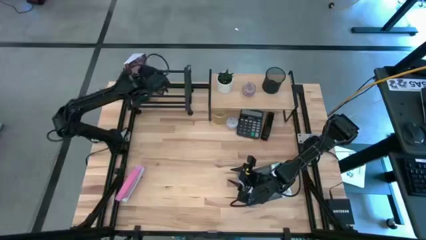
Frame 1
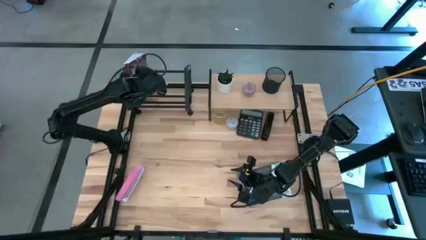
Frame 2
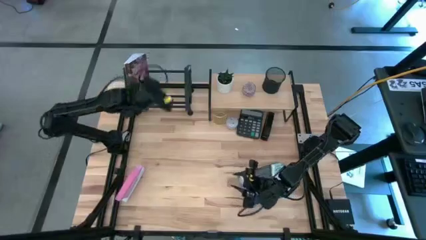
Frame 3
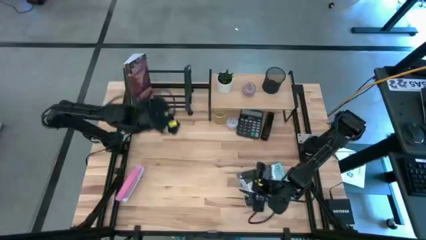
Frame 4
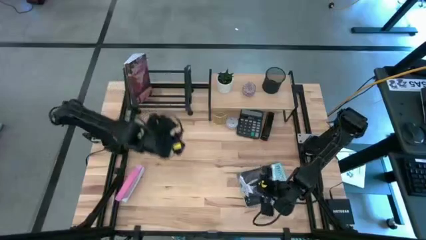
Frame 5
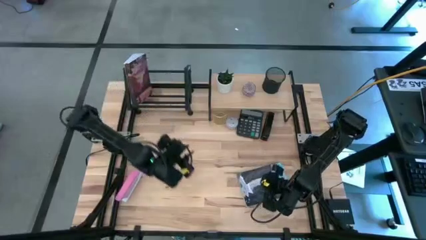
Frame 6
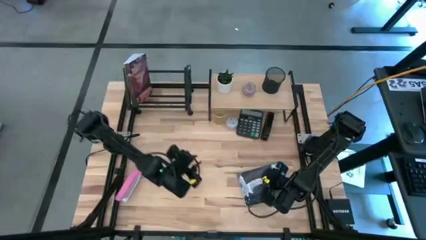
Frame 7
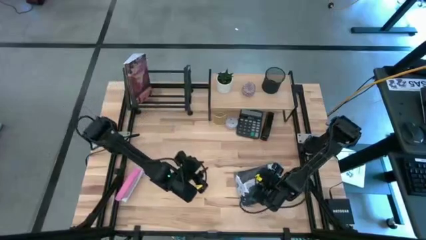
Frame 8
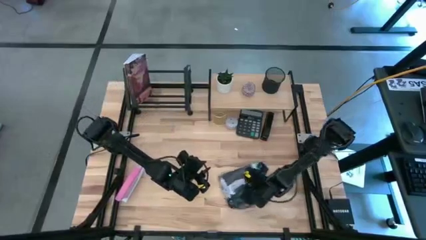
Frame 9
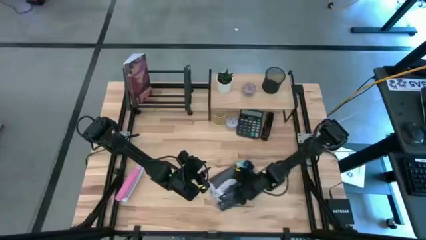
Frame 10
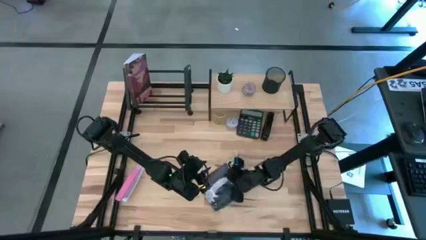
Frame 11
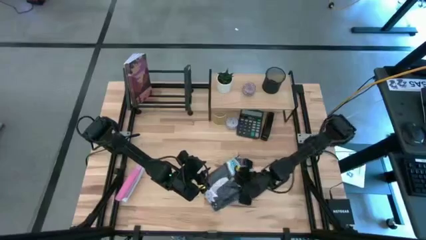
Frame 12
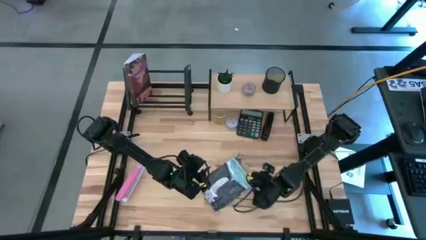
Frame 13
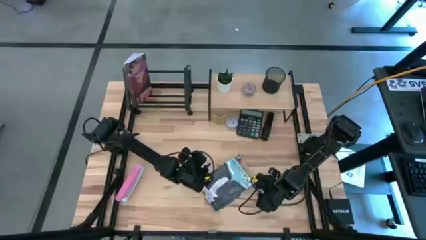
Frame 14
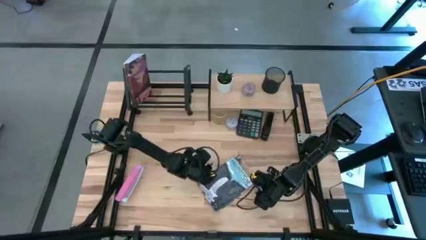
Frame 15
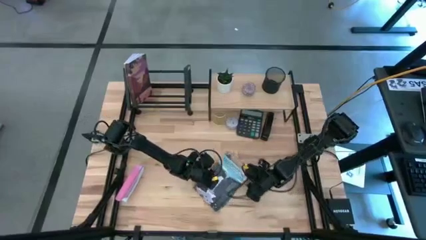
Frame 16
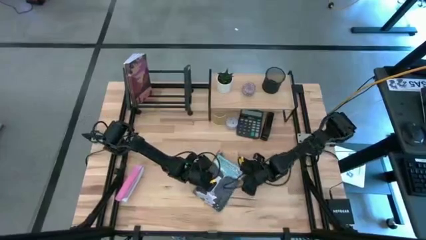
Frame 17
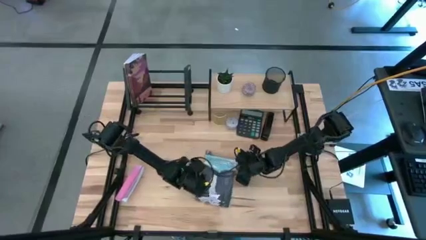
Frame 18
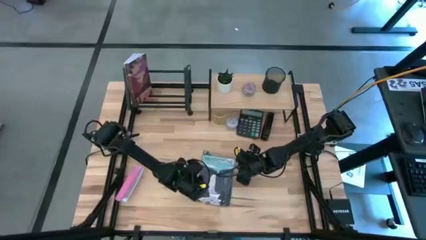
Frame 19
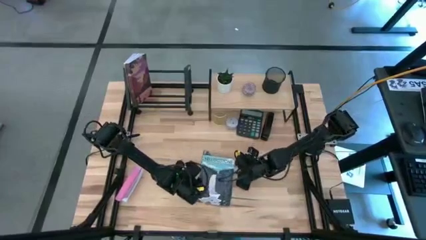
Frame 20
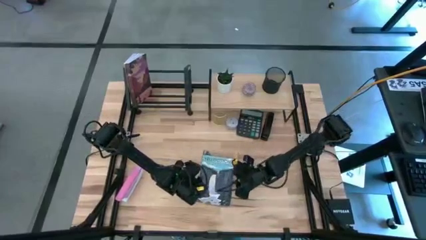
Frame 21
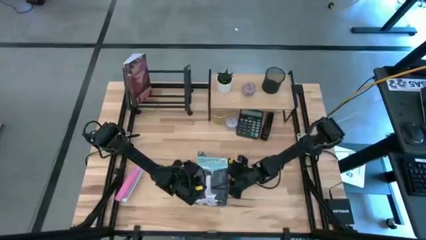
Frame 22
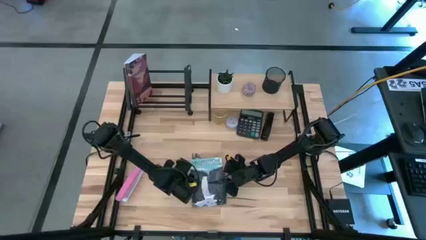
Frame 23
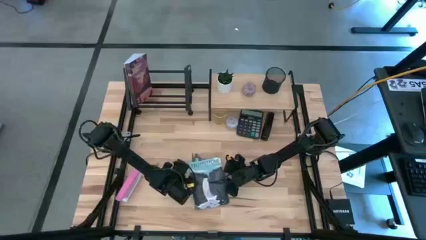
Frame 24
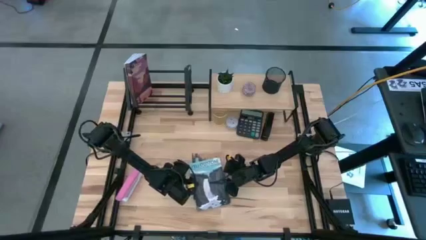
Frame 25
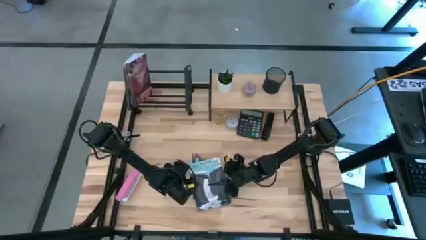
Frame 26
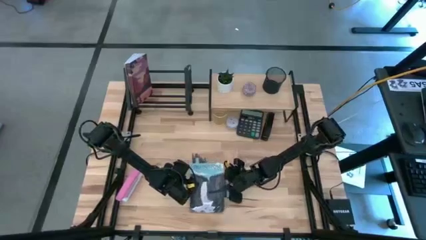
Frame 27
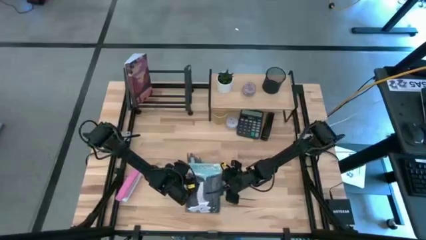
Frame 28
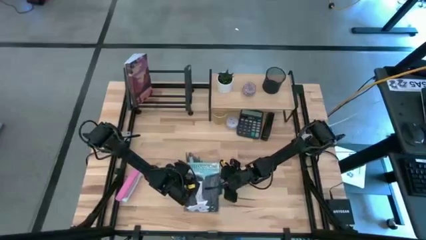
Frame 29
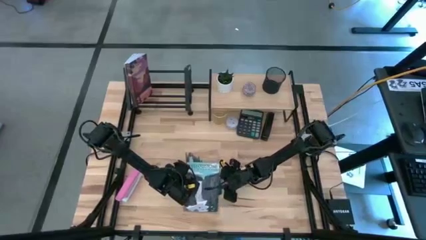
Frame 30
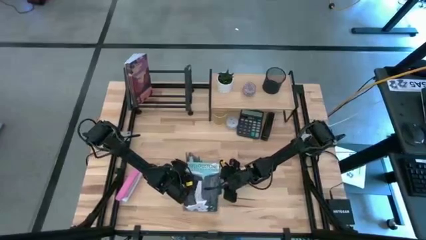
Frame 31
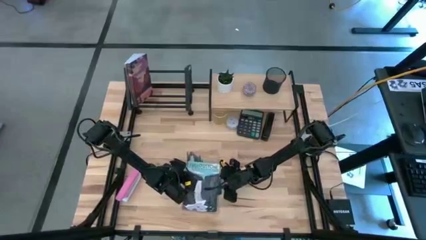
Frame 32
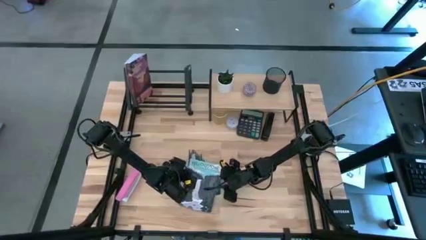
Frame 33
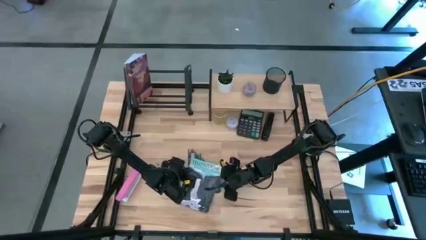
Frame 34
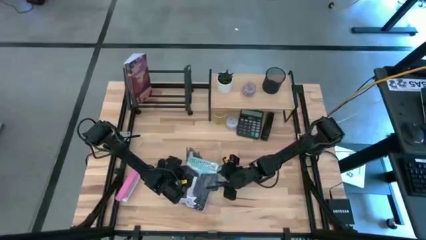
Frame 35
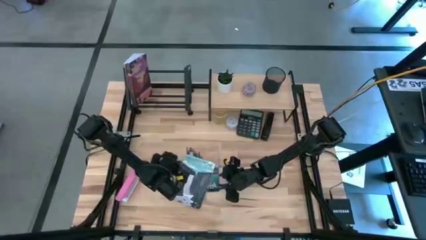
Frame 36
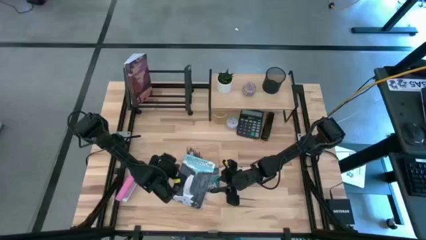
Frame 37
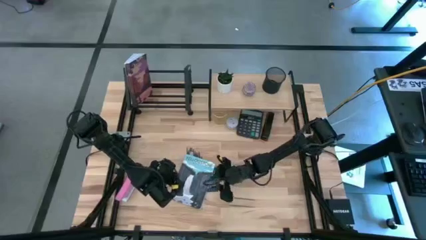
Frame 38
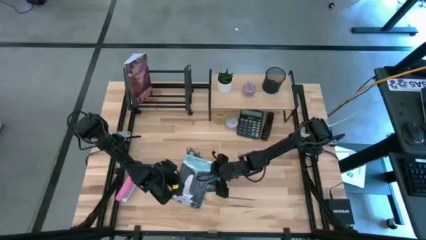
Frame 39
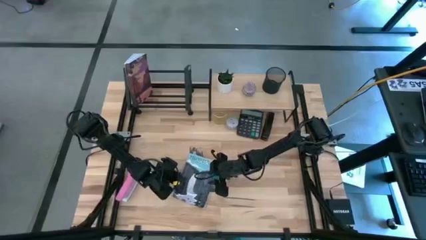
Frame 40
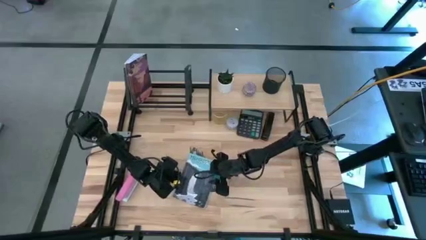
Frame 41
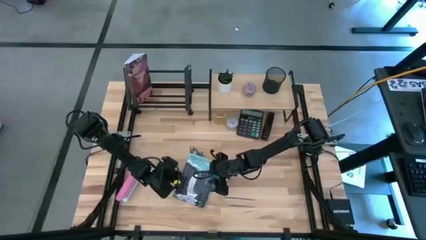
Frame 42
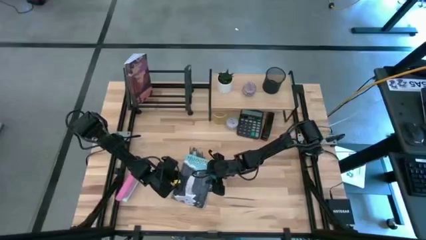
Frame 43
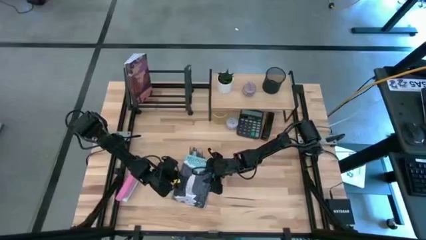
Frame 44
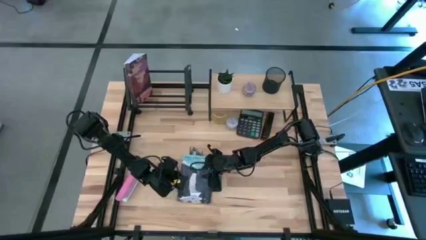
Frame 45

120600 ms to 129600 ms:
Task: Stock shelves
Put the blue book into the book holder

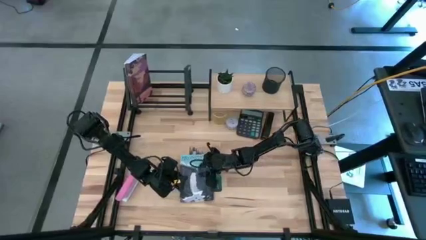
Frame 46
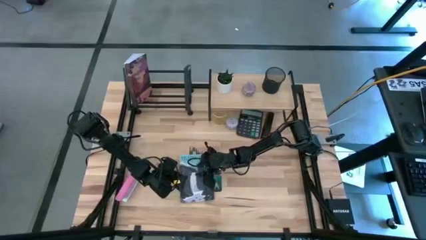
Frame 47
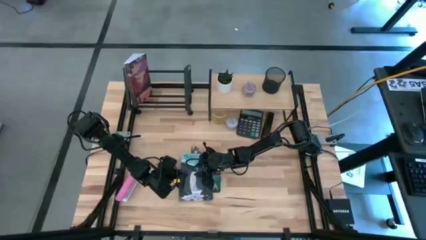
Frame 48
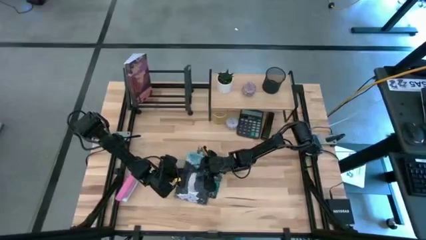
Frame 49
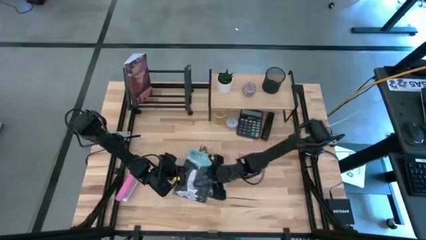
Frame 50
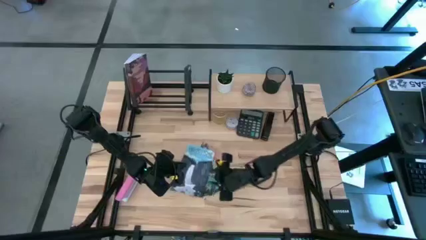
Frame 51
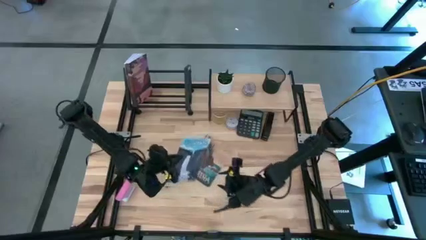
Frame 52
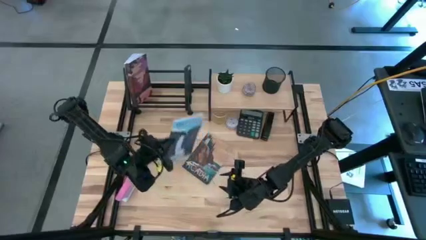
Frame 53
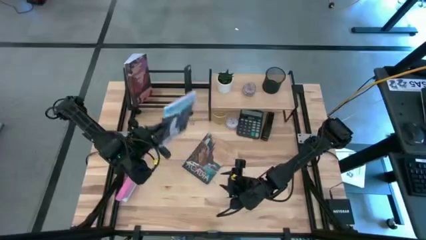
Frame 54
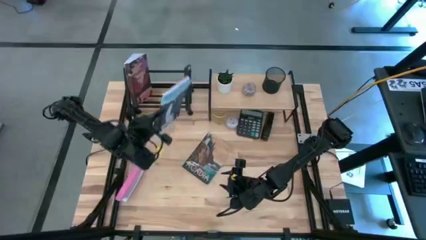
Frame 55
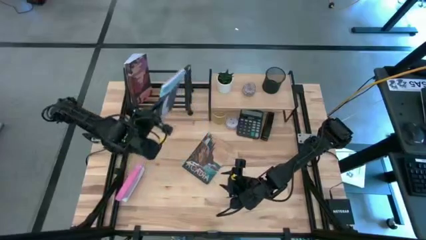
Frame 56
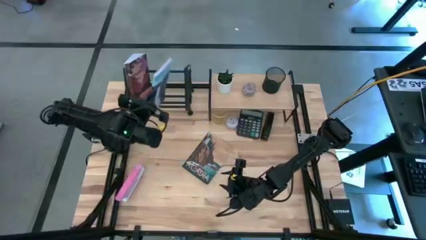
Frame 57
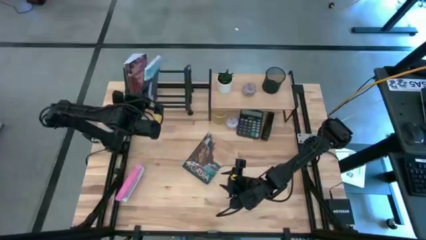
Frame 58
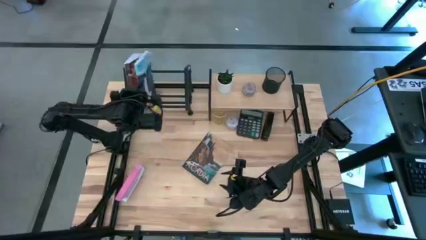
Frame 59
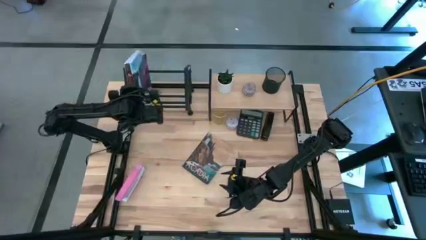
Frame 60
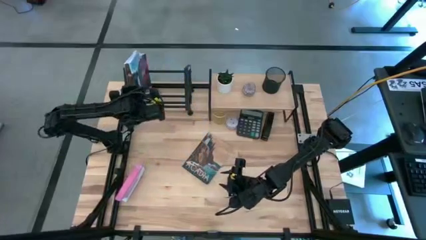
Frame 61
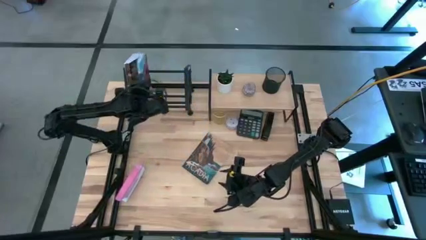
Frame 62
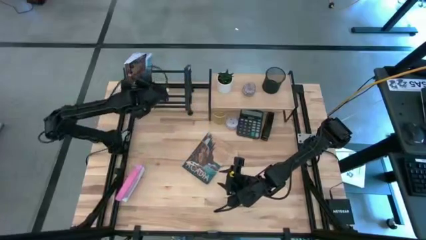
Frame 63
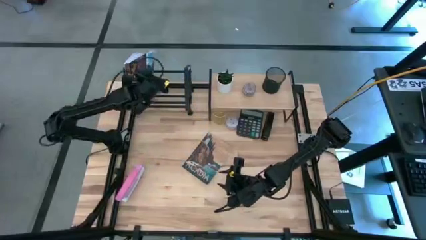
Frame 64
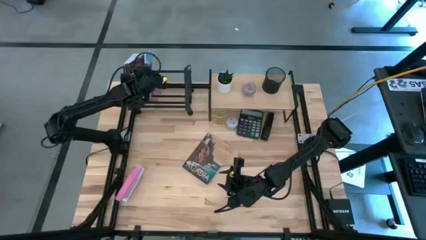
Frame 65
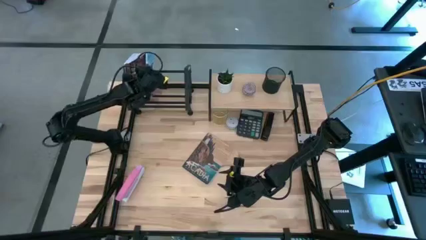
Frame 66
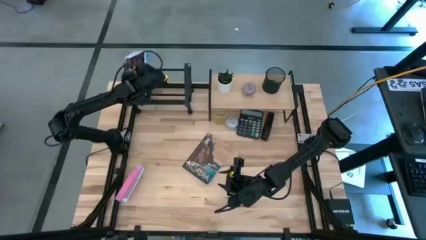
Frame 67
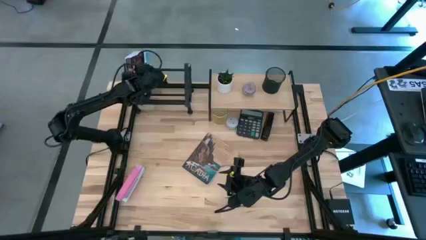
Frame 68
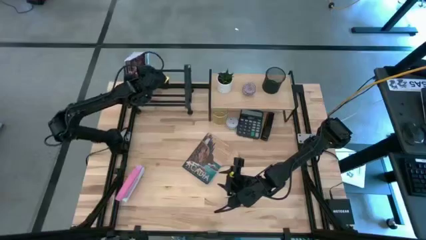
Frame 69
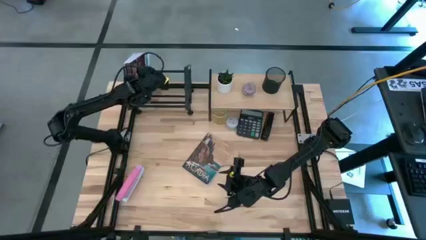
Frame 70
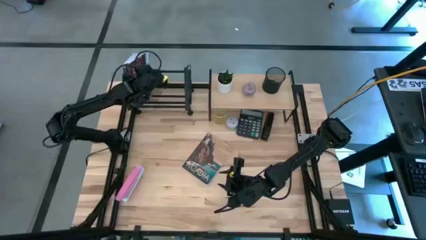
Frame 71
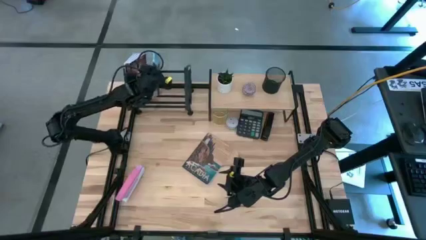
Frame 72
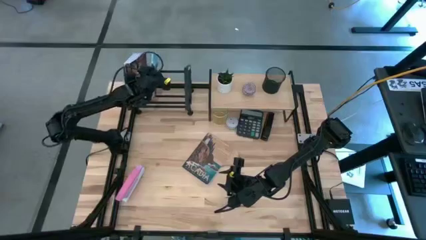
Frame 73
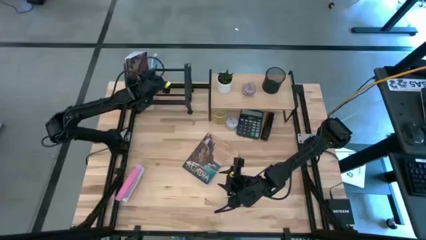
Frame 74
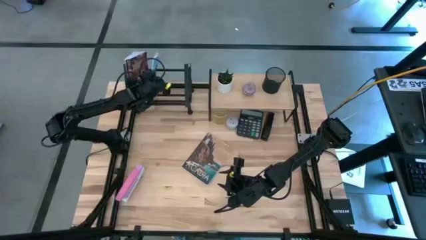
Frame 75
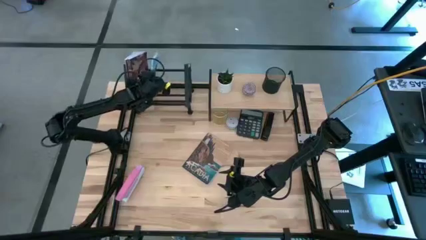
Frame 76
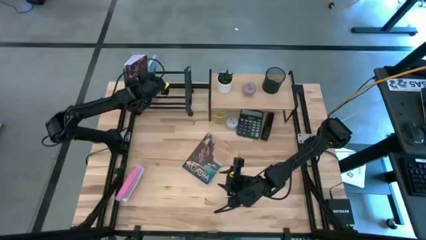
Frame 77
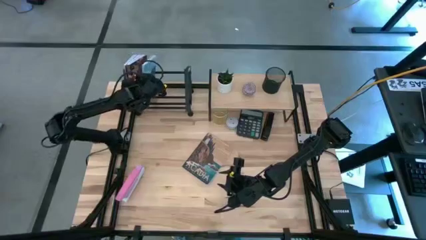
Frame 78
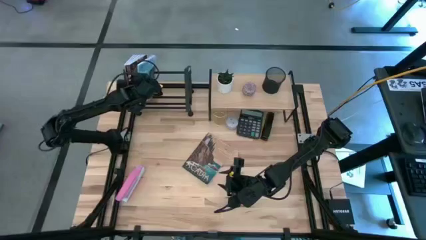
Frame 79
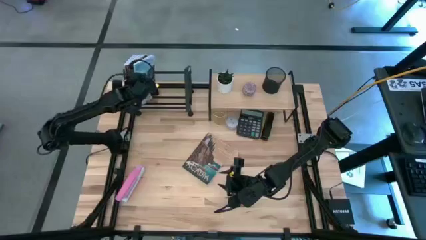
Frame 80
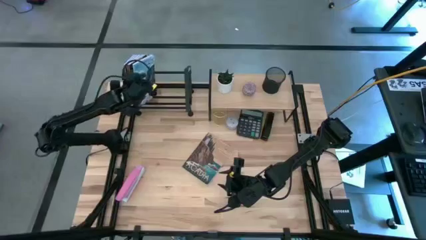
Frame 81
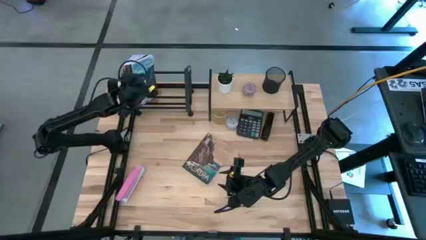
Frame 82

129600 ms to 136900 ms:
Put the blue book into the book holder

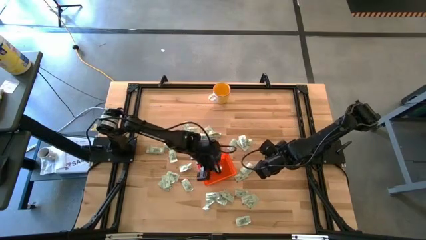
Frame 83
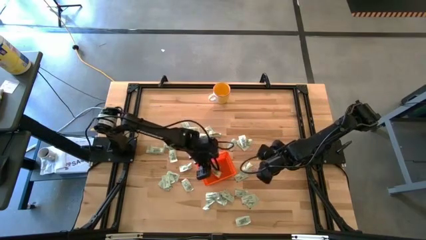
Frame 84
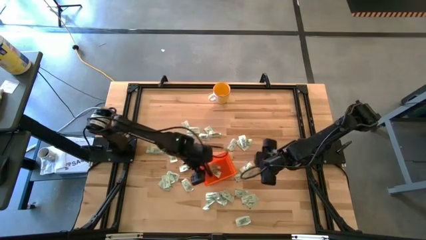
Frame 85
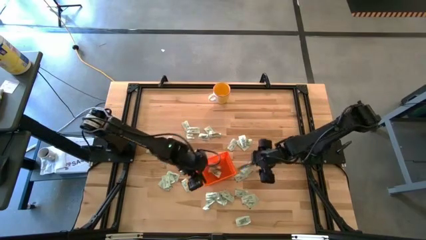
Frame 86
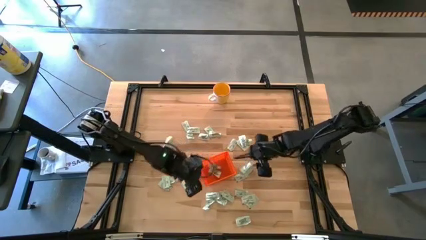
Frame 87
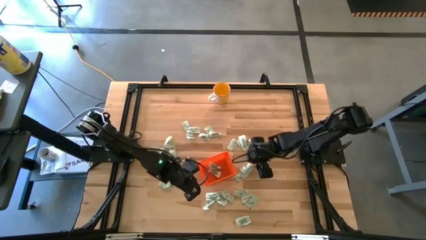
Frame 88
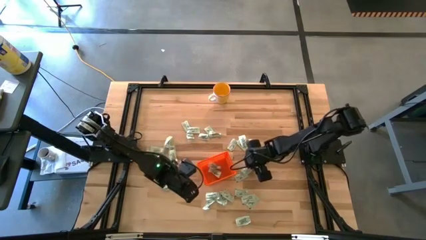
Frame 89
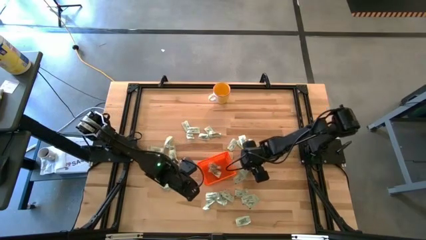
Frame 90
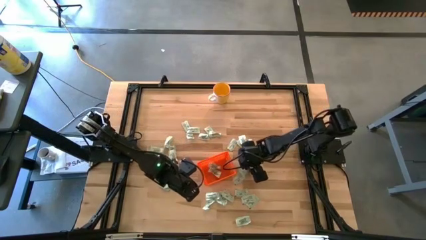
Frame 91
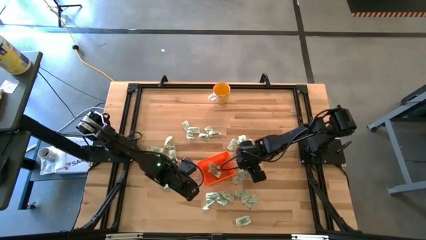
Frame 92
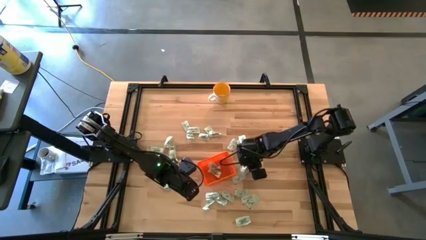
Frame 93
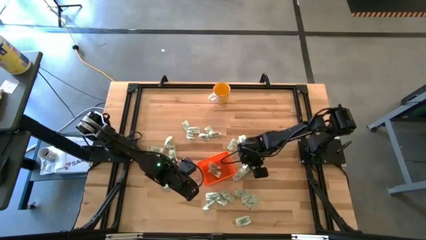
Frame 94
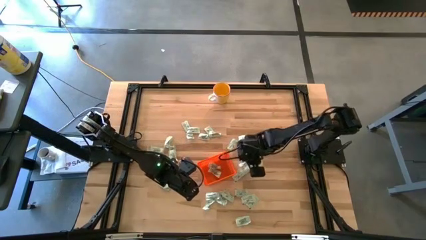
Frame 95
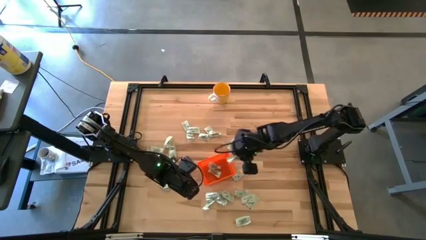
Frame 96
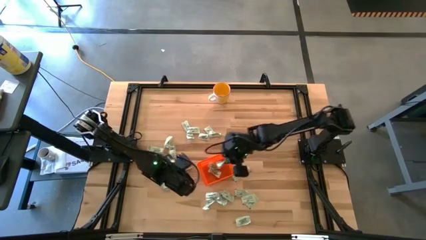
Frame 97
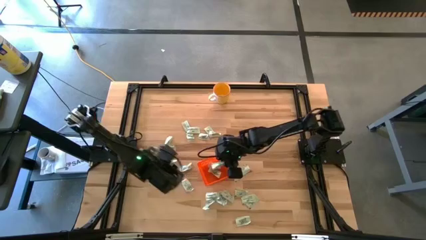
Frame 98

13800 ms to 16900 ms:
Task: Pick and place Stevia / Truvia into bins
Put the stevia packet into the bin
